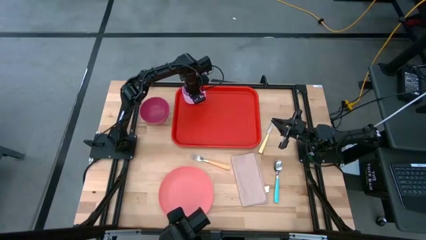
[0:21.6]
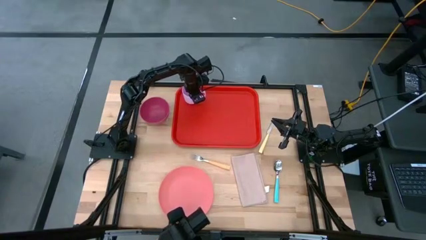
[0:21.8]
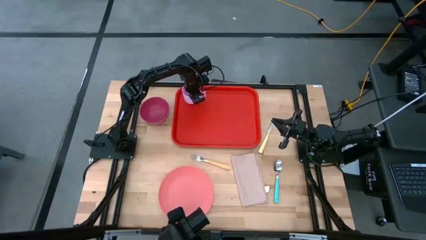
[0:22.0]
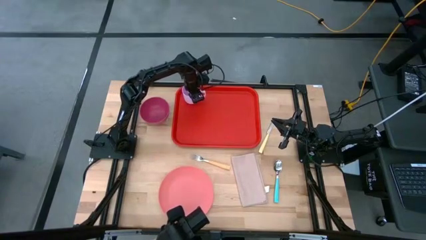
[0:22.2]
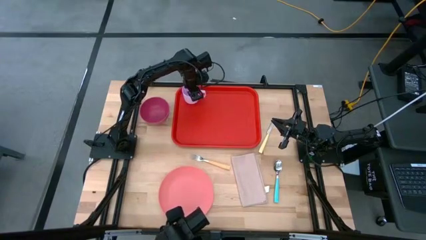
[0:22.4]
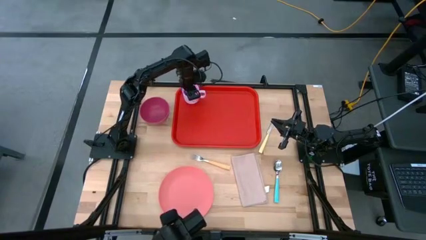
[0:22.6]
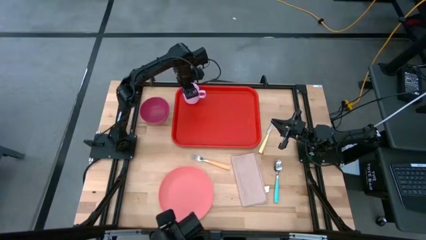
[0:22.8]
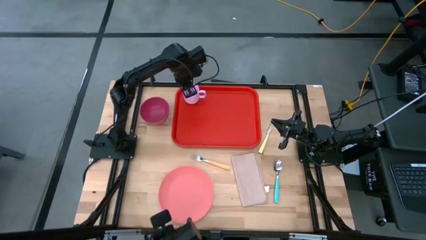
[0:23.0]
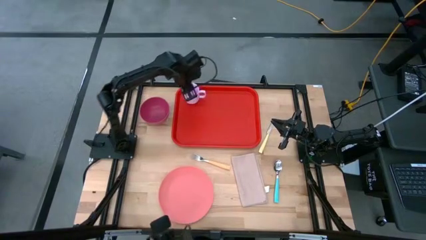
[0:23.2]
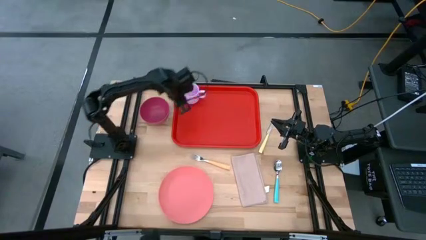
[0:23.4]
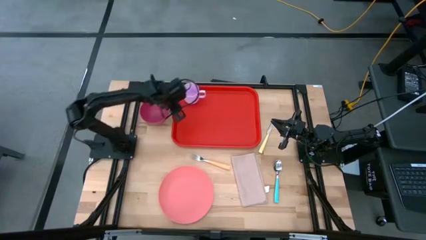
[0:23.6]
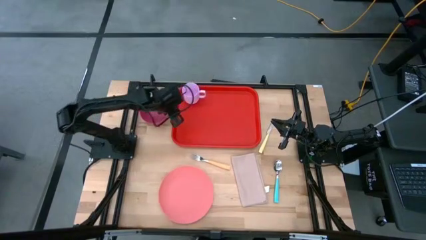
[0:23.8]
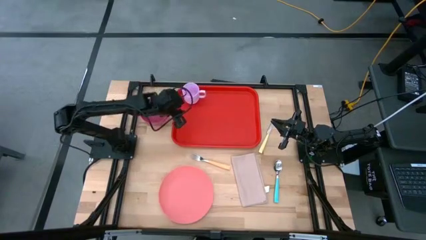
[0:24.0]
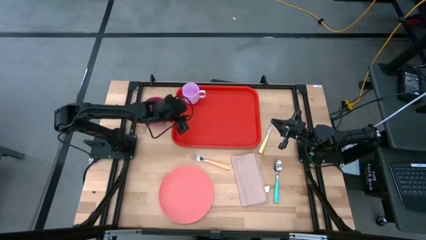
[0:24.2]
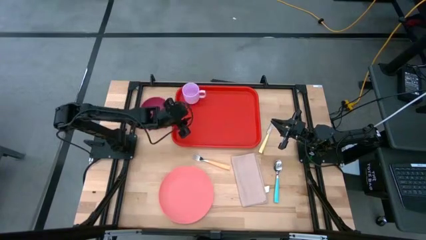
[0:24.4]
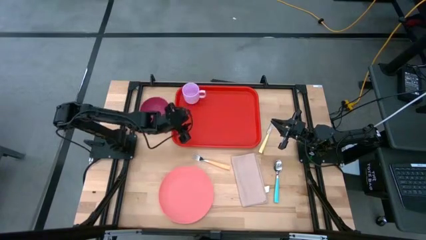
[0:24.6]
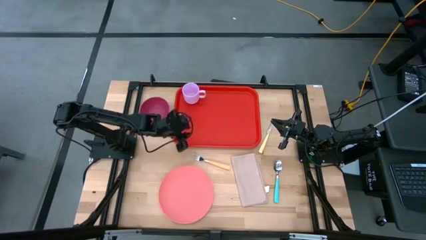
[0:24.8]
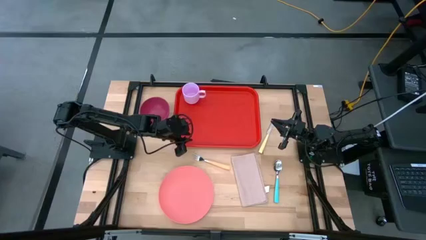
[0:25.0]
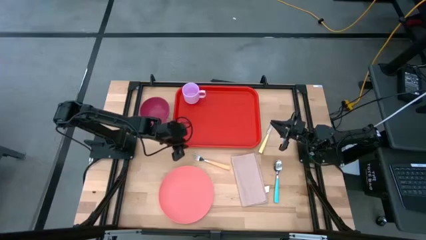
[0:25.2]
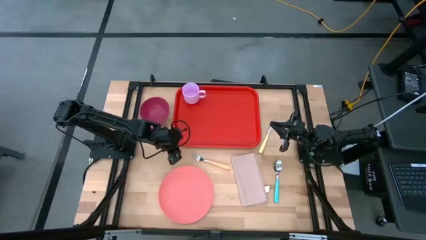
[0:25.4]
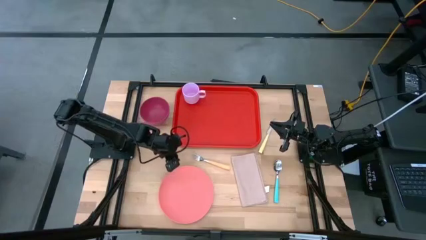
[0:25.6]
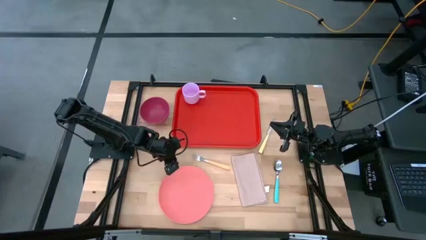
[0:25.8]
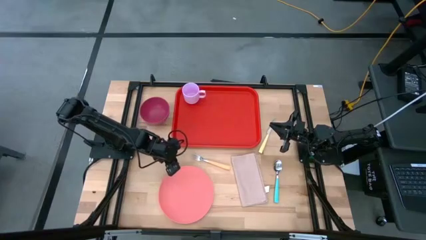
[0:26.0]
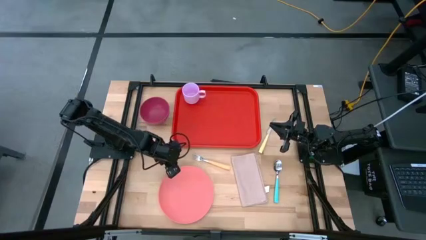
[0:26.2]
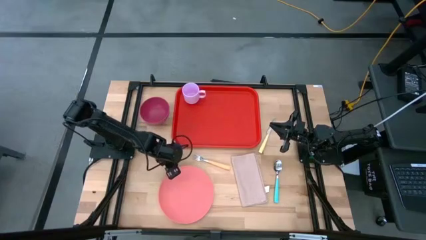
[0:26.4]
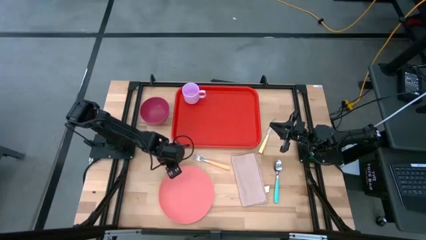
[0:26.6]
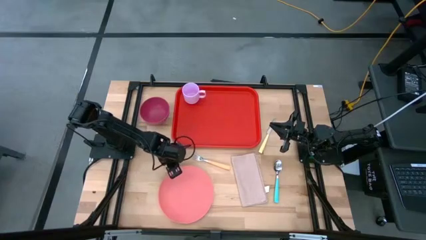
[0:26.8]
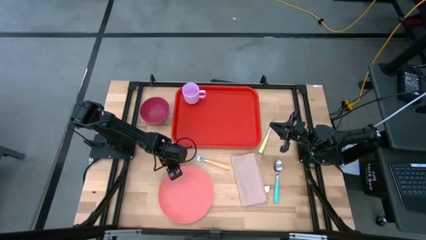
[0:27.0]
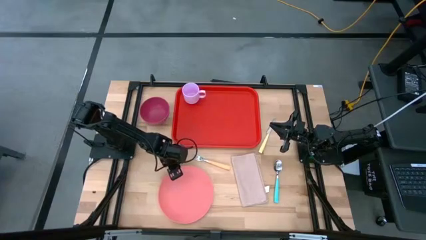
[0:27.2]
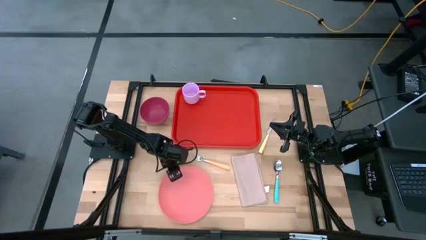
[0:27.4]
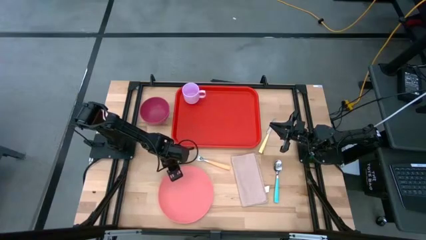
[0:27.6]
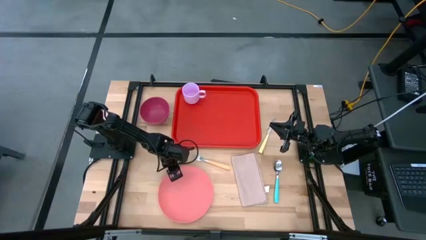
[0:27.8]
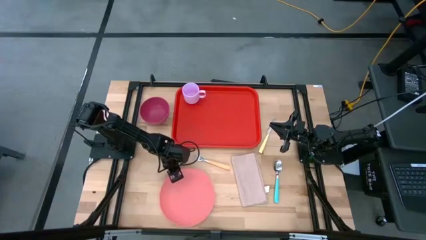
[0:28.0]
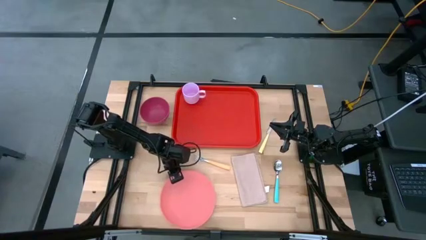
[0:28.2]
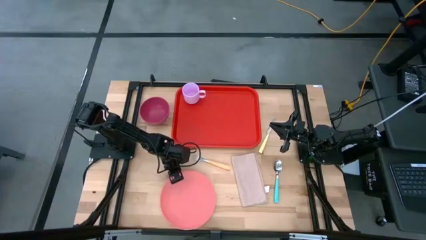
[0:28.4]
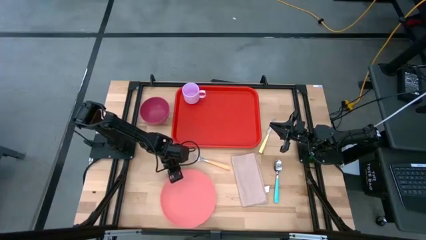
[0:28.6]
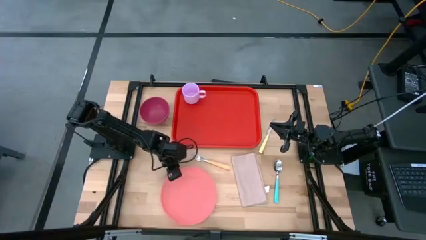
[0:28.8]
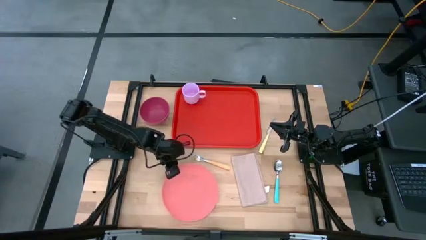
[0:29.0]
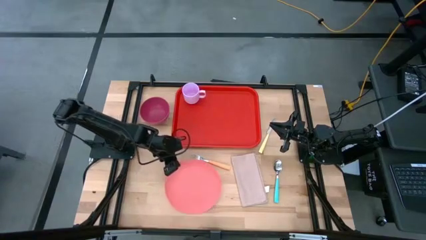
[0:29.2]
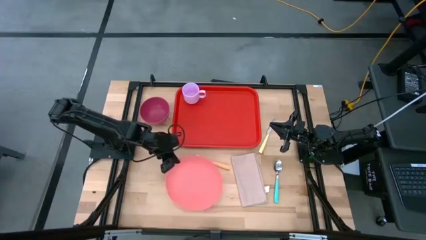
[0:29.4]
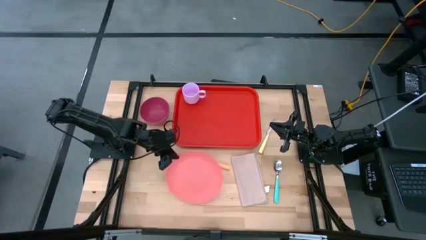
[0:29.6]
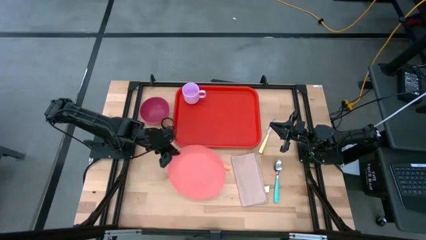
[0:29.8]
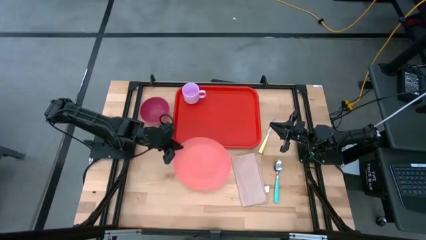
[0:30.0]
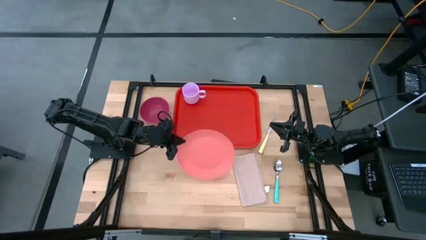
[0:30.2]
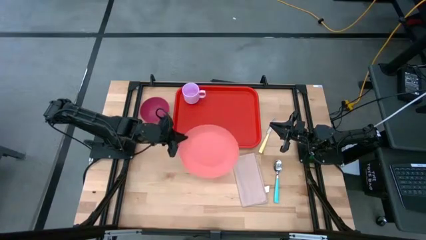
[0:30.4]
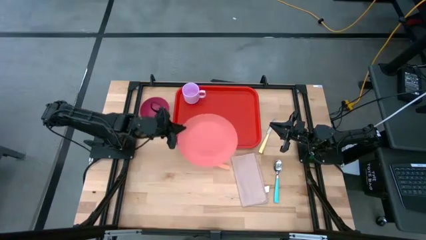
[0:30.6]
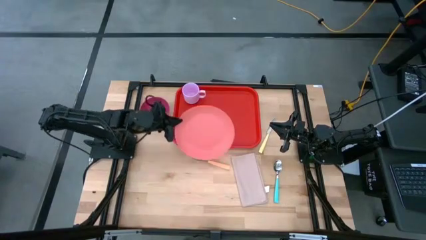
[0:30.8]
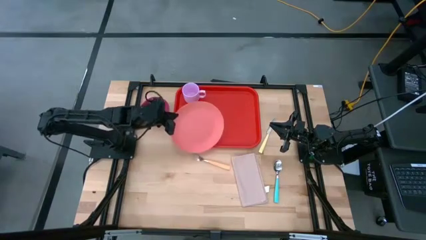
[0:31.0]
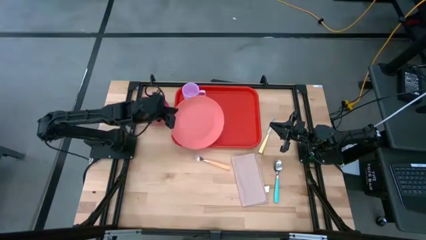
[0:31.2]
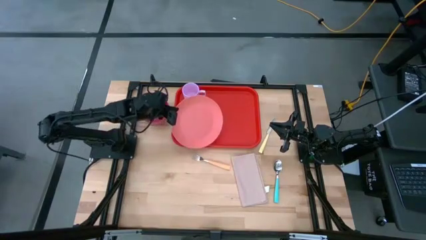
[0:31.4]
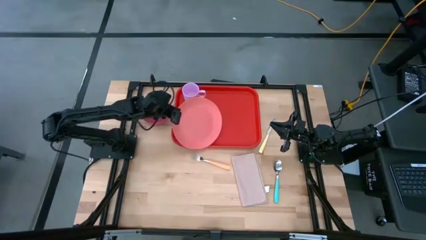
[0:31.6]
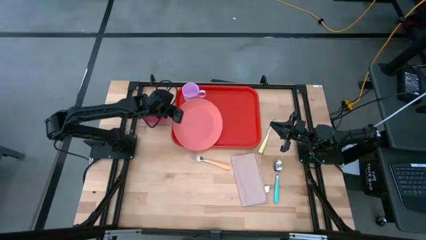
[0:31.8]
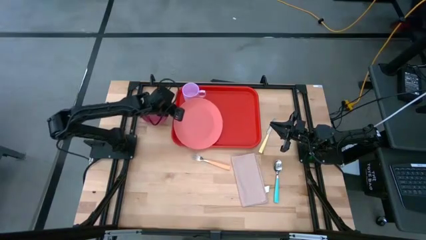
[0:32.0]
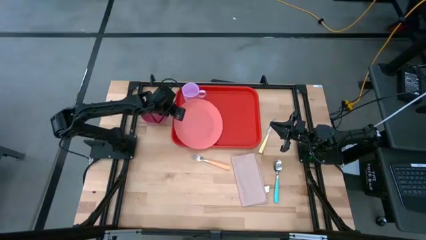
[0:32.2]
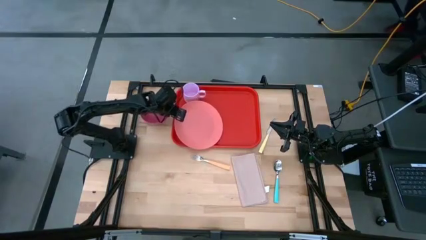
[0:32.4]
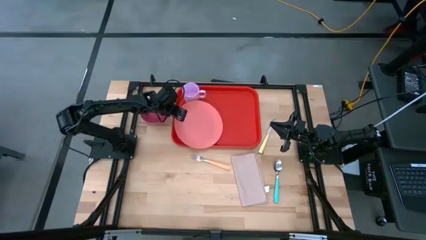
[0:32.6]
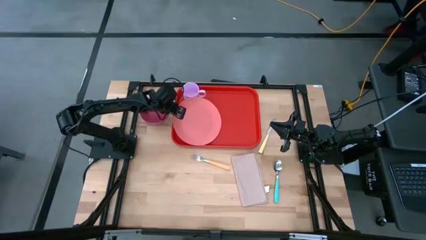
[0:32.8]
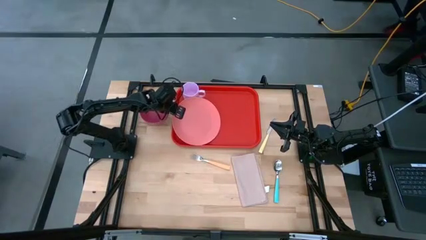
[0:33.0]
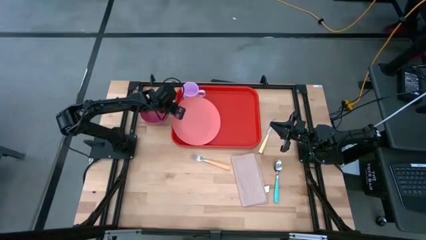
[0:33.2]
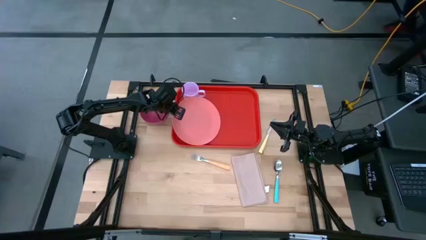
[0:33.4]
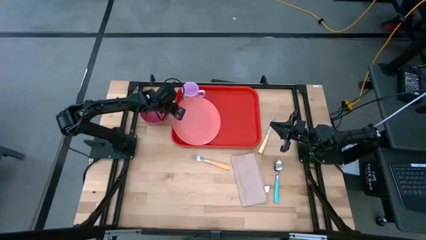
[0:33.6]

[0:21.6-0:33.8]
Task: Set up tray
Put the pink plate on the bottom of the pink mug on the red serving tray
